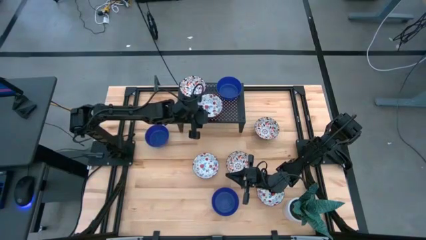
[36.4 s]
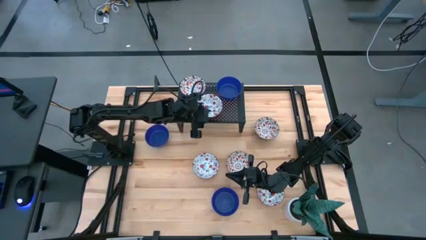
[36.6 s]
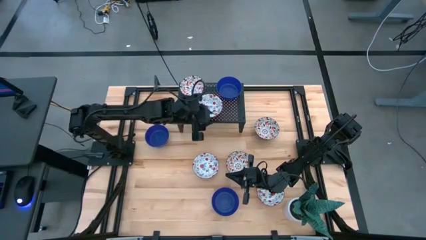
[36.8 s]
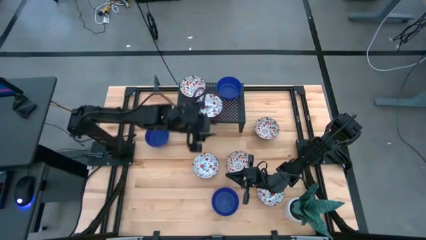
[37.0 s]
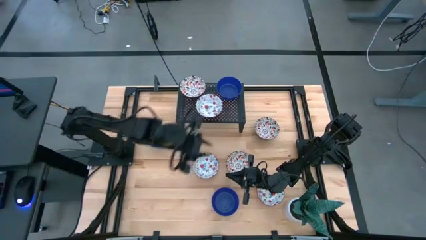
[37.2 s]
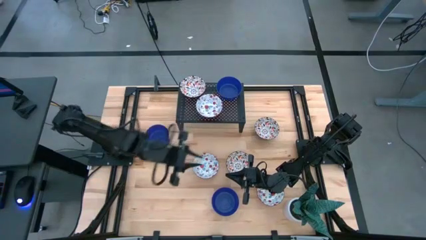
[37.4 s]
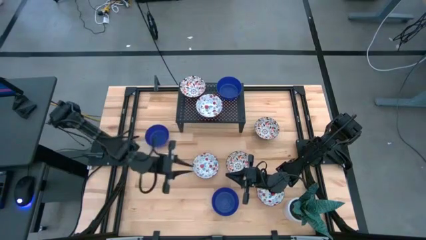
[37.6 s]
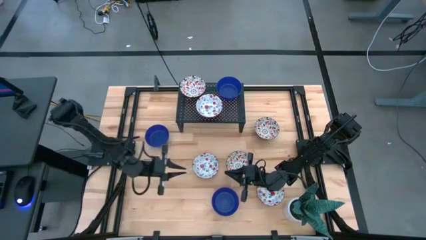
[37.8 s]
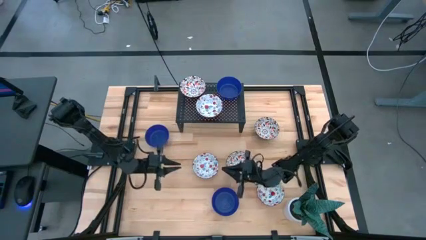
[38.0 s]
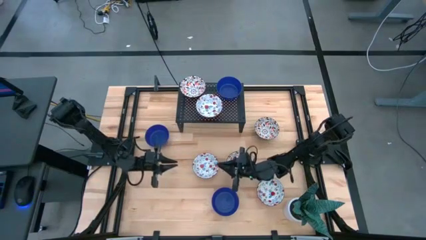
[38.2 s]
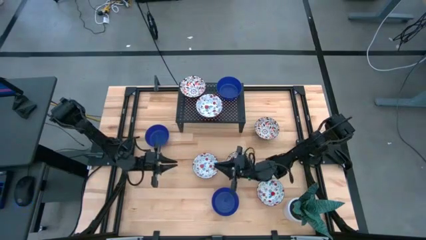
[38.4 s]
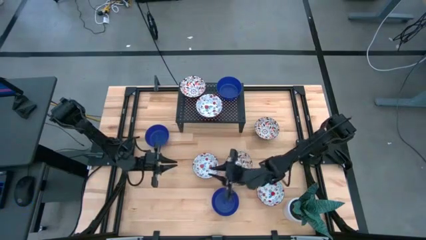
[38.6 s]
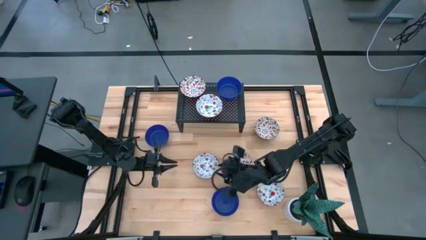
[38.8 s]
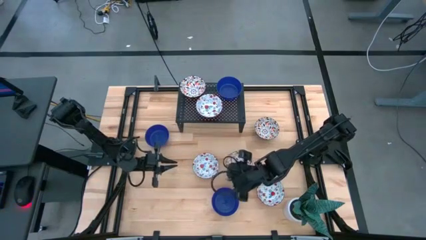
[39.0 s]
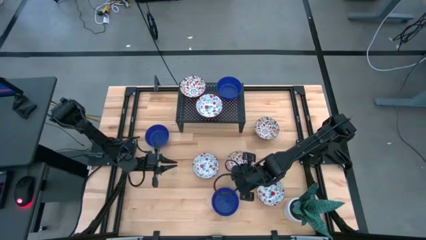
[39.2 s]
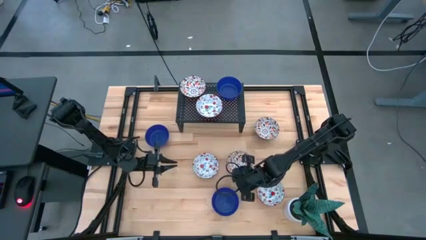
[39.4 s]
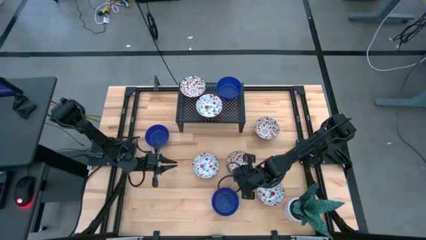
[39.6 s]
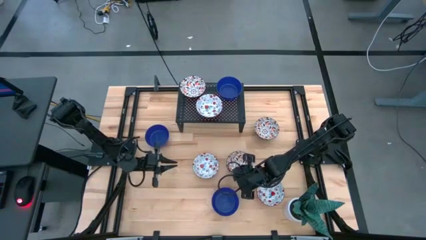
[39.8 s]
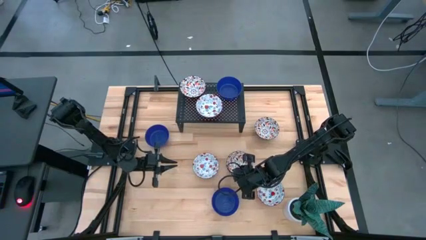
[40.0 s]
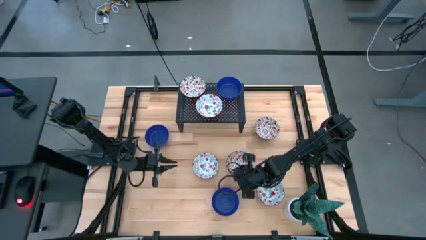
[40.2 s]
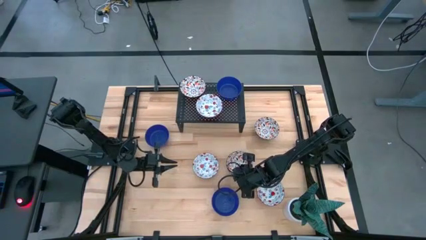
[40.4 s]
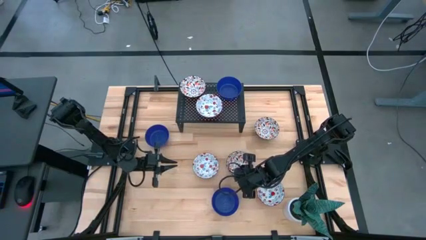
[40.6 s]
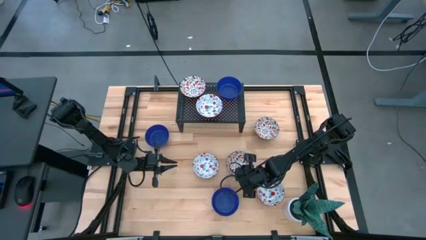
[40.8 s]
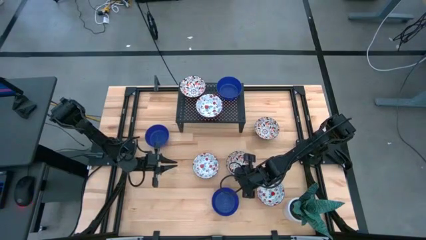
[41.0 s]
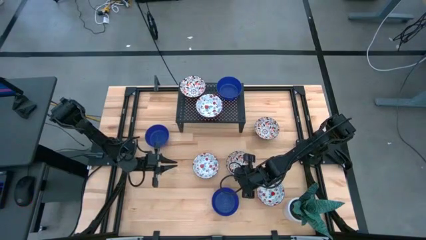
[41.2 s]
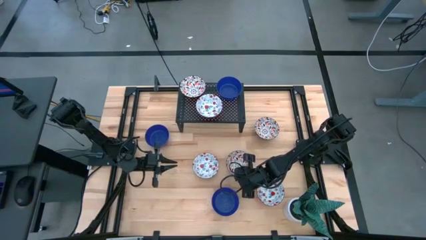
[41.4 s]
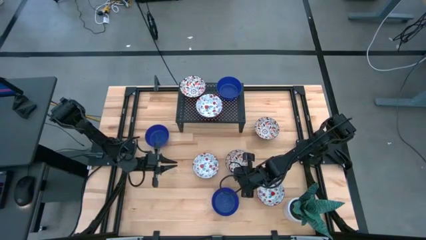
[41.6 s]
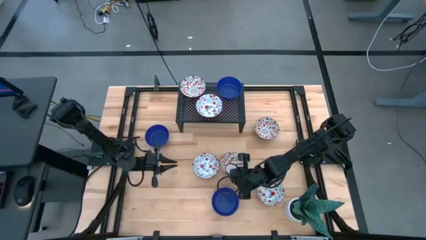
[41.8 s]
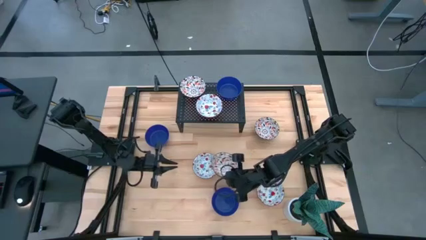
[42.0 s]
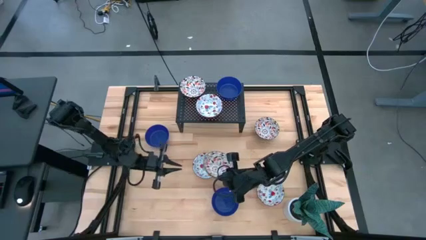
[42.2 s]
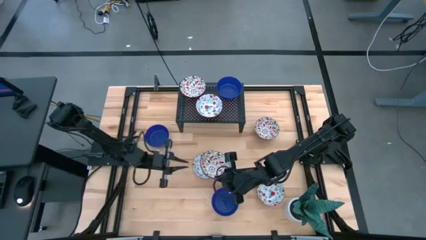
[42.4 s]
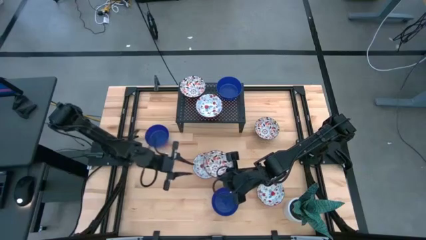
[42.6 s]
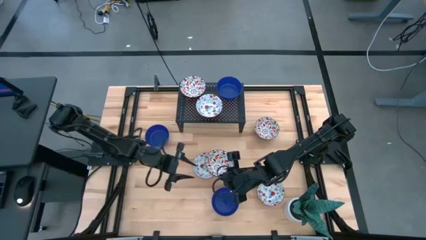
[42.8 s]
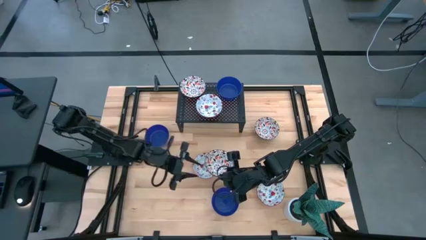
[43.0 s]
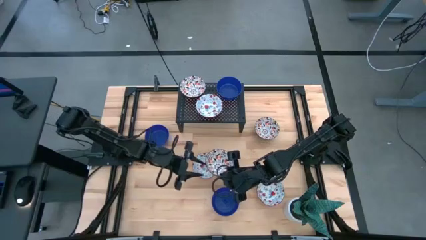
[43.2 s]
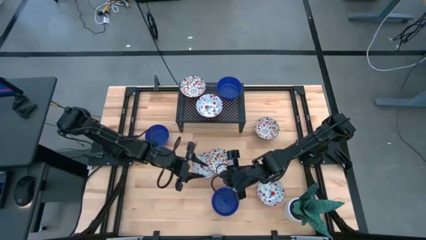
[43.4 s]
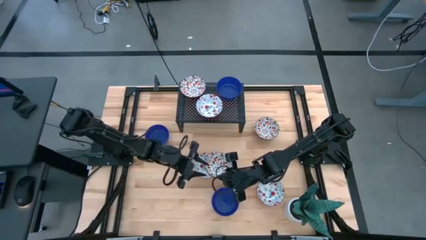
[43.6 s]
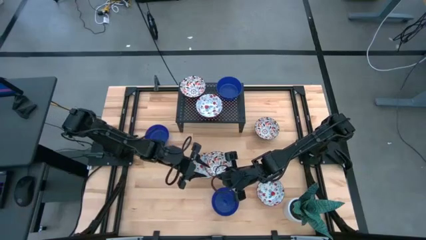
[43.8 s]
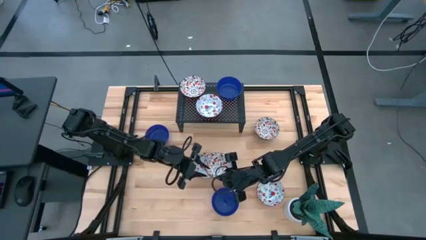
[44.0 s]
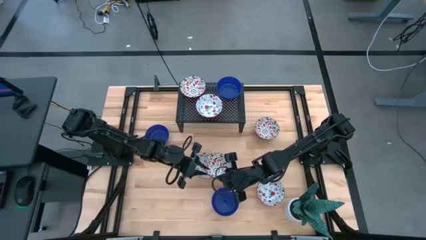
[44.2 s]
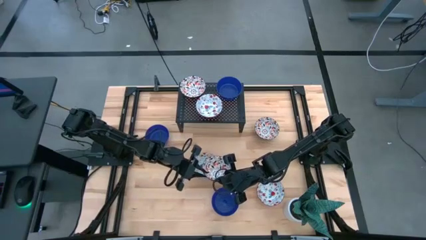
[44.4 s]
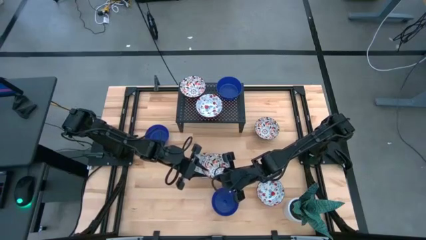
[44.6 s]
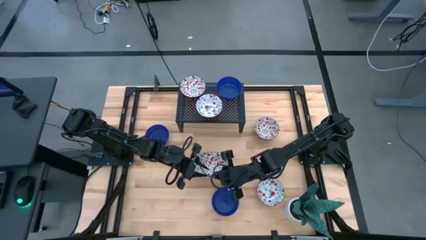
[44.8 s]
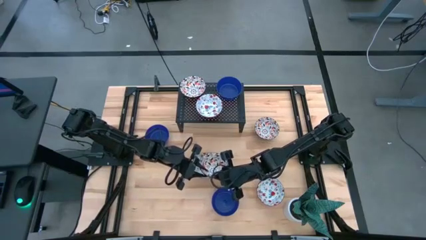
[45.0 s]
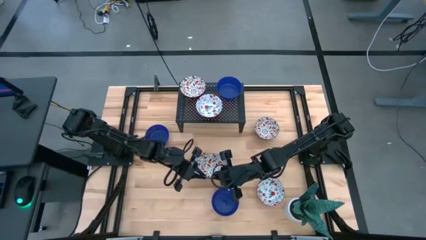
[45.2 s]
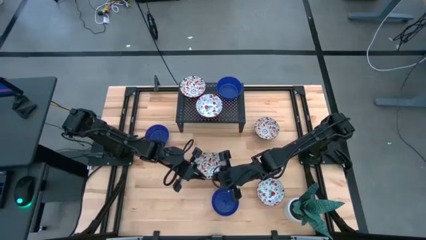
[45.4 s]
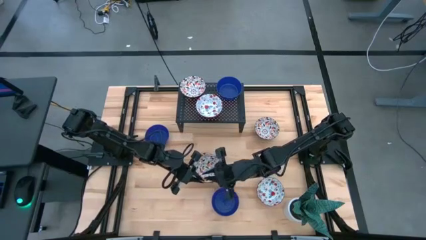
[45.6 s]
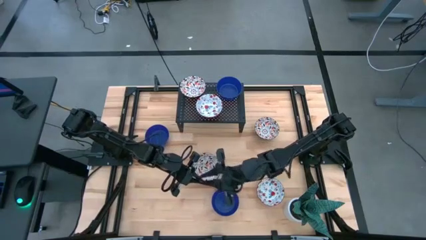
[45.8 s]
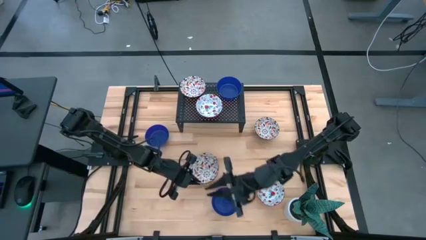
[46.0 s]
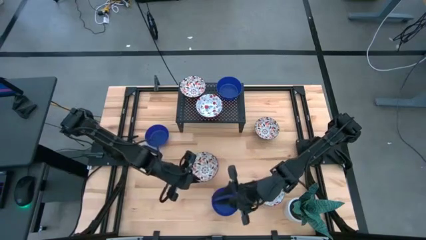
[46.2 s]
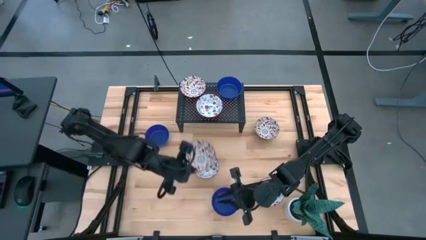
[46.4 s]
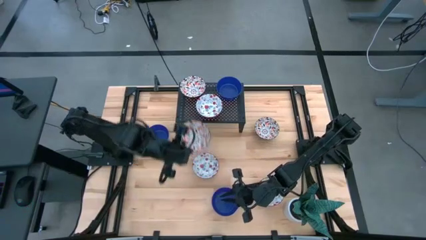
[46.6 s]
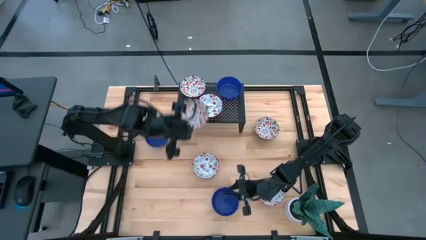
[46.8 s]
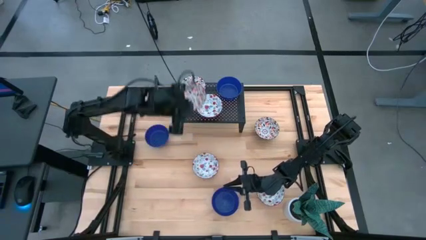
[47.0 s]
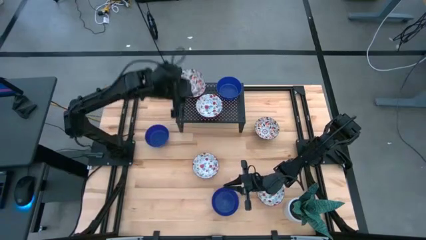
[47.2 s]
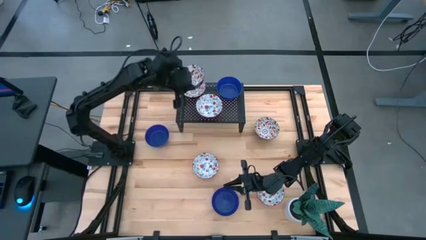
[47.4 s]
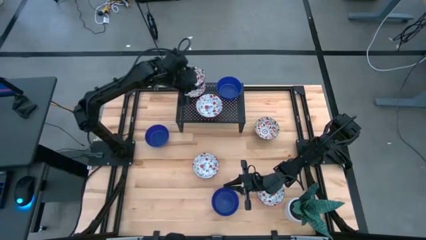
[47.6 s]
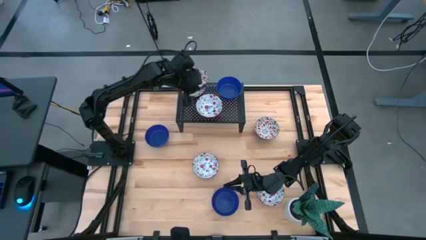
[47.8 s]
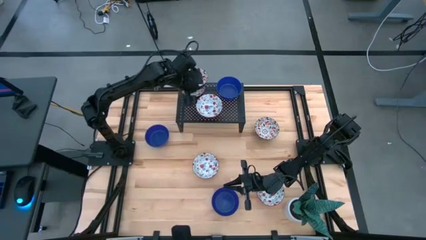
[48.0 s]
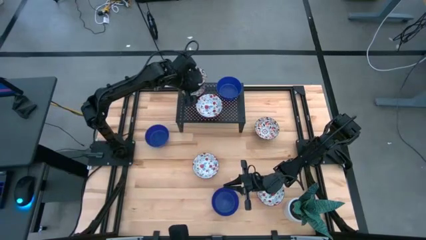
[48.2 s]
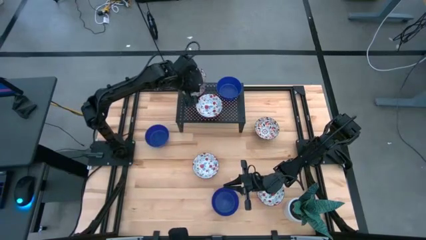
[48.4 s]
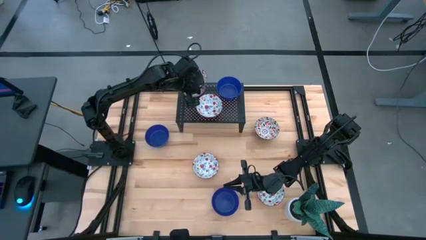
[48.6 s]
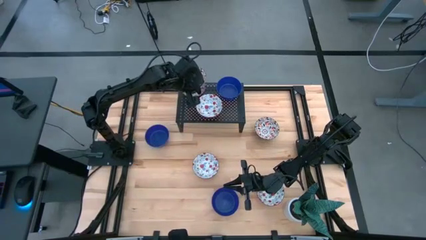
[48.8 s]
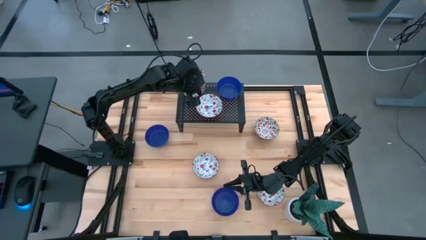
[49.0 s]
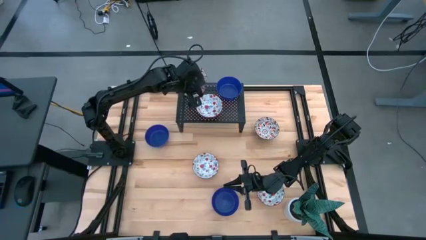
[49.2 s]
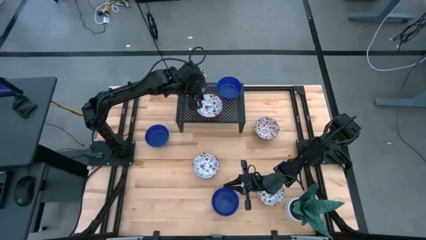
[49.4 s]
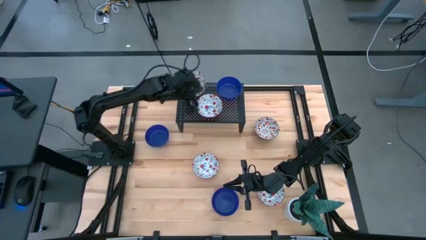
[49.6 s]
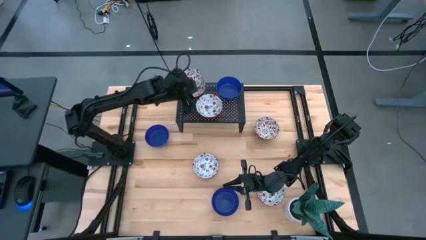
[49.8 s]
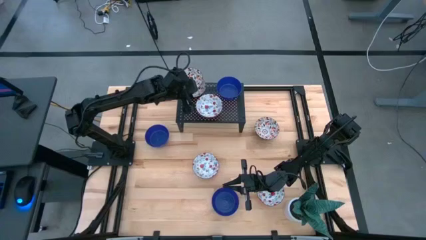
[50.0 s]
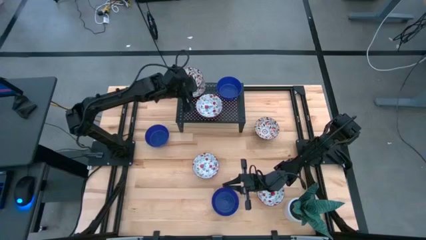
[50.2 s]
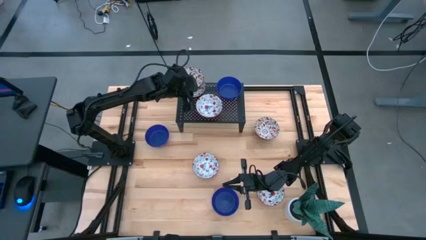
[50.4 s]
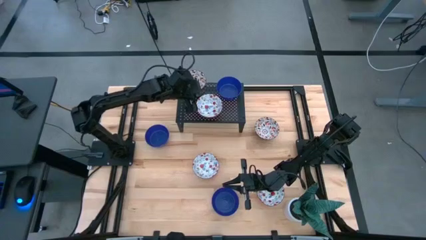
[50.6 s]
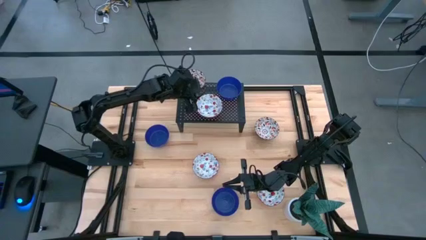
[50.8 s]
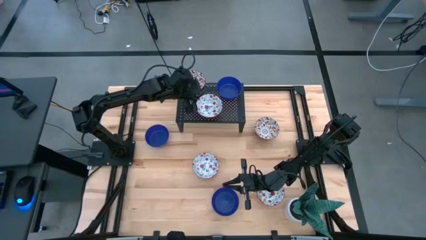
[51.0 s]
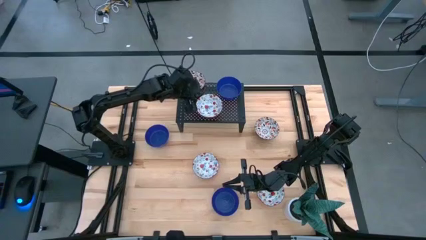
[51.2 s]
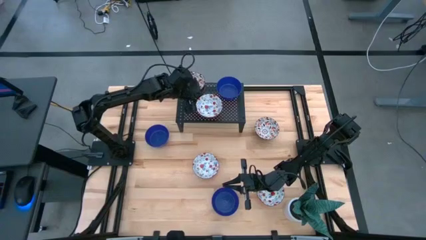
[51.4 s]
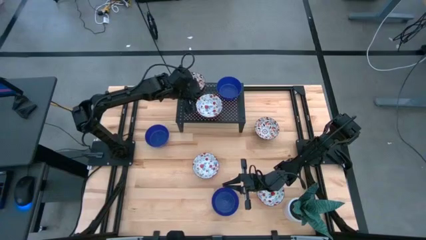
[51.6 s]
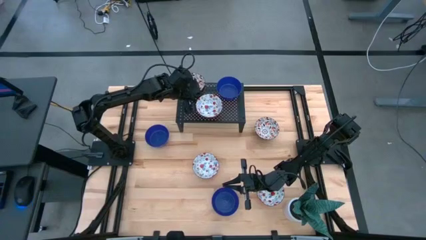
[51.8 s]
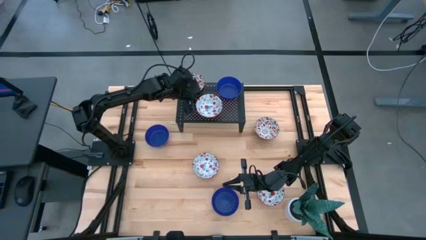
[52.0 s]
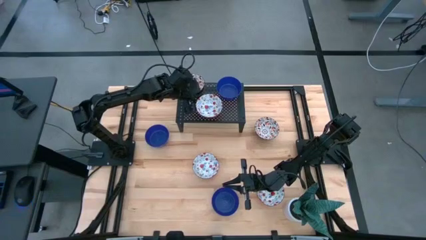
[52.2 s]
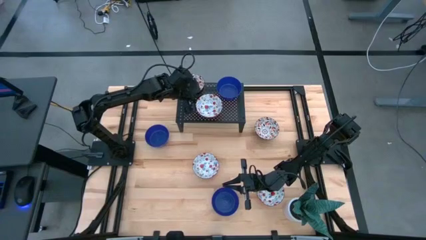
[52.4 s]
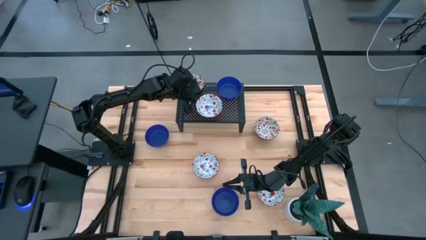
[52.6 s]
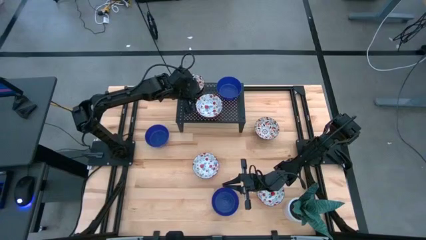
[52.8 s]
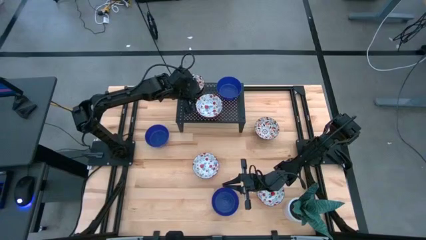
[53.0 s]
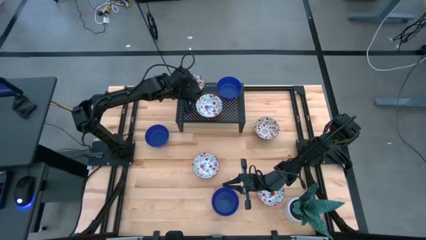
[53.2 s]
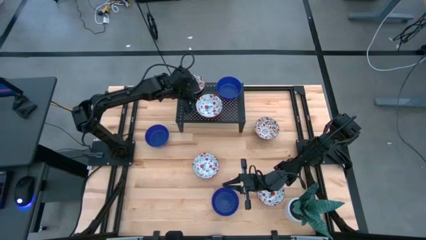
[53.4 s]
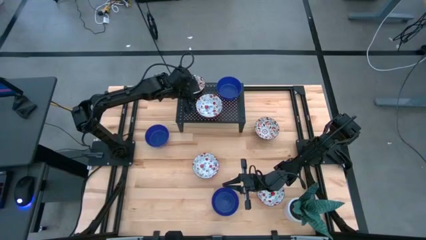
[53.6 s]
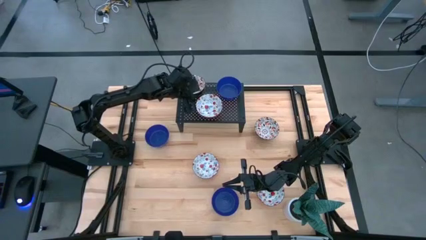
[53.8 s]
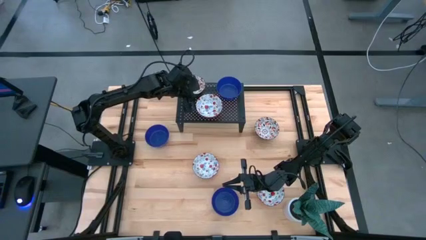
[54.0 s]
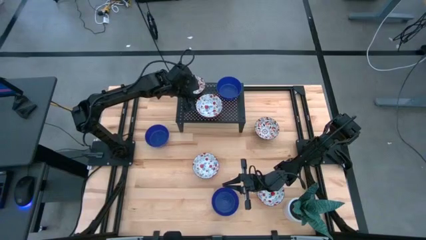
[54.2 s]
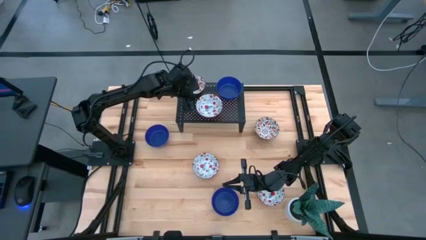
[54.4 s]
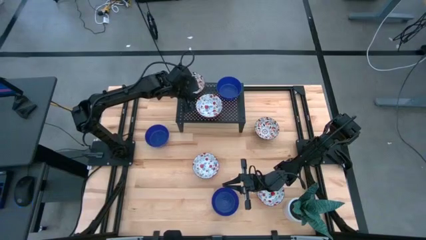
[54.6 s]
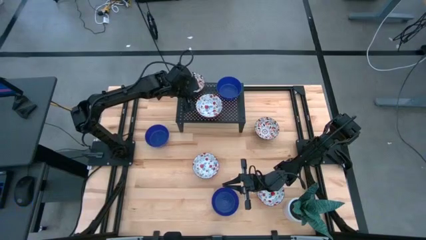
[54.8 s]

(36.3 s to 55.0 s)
Task: Pick & Place Mini bowls
Stack the bottom black bowl on the black bowl on the shelf
